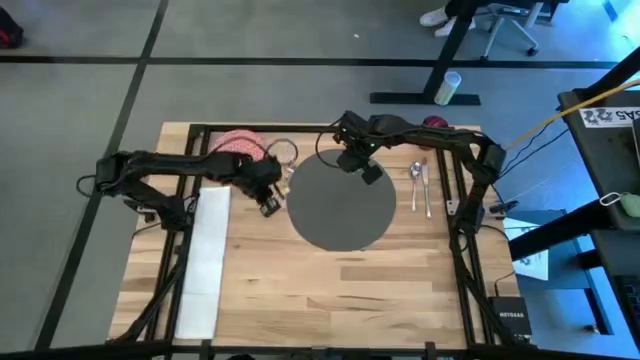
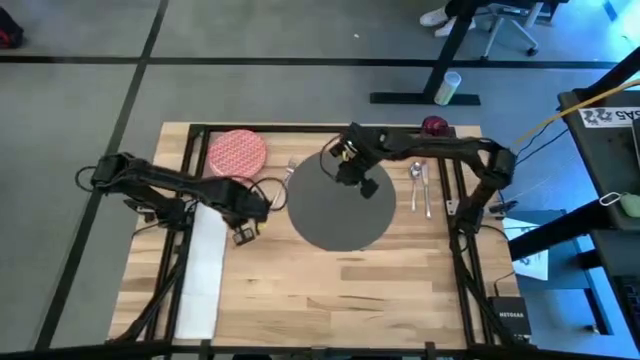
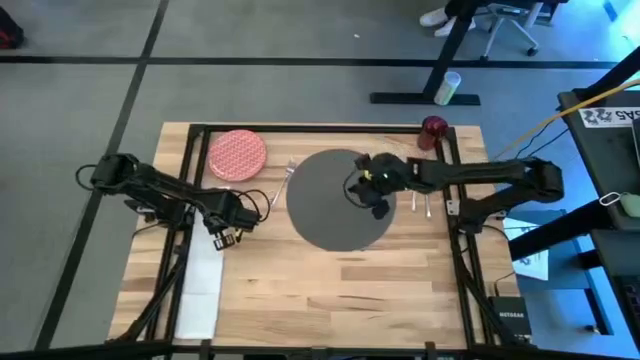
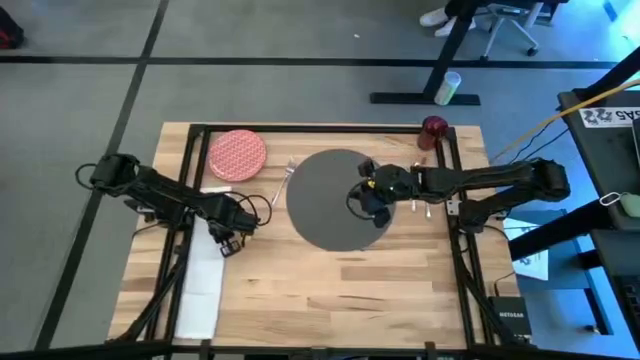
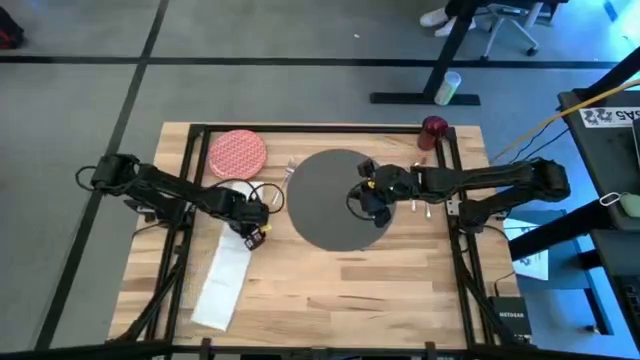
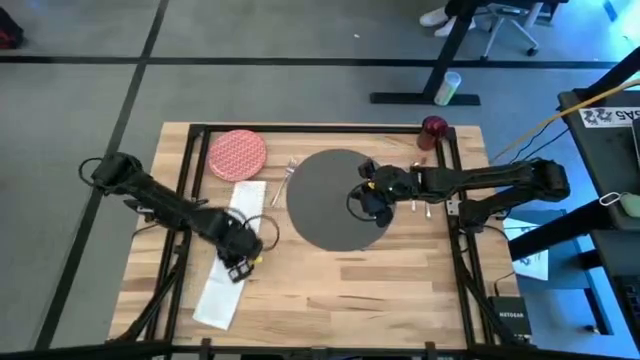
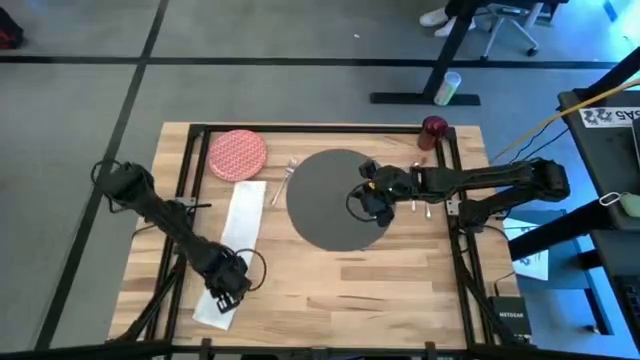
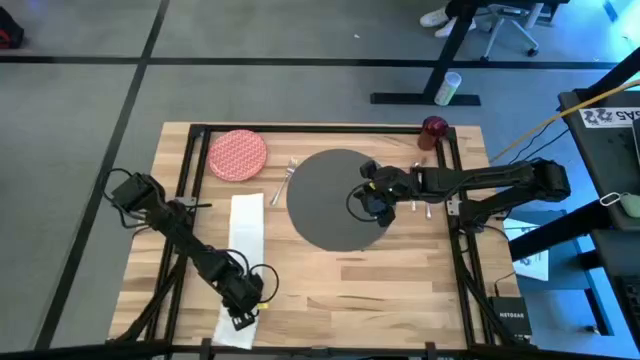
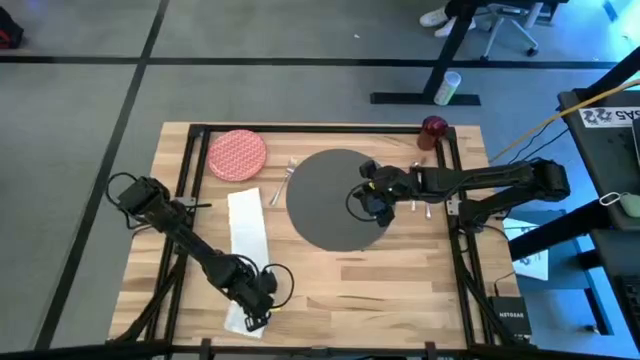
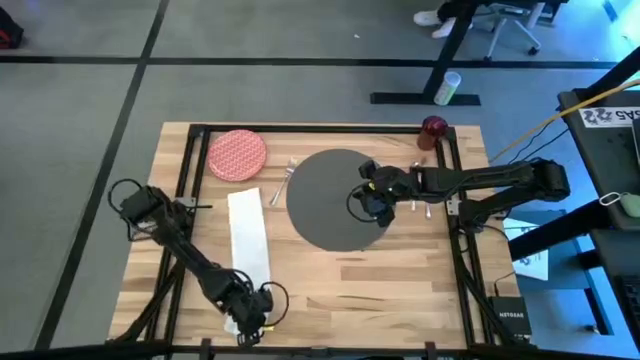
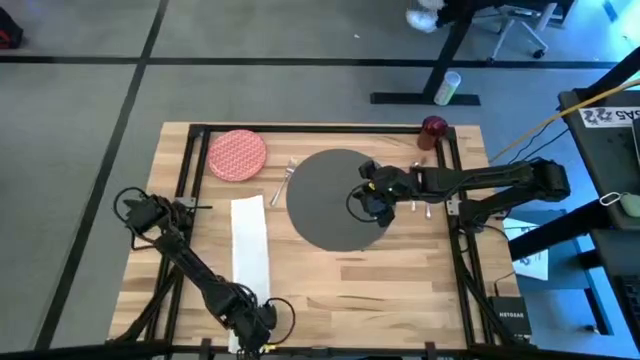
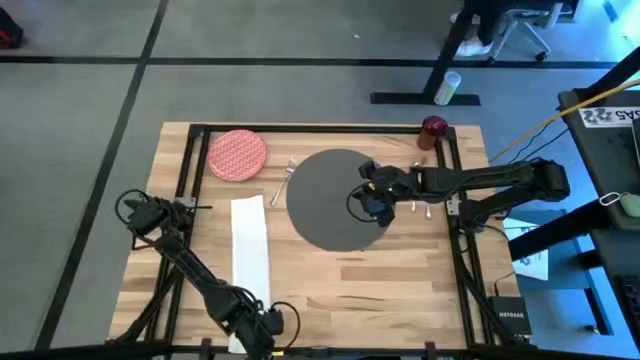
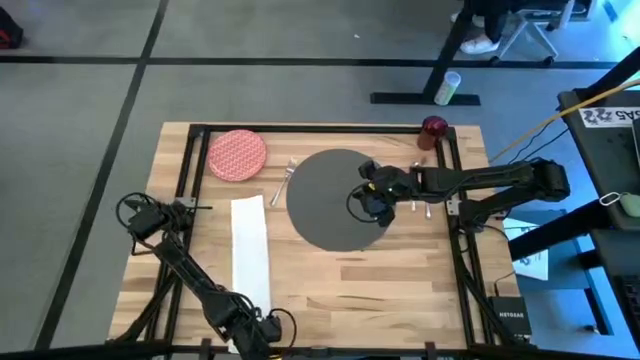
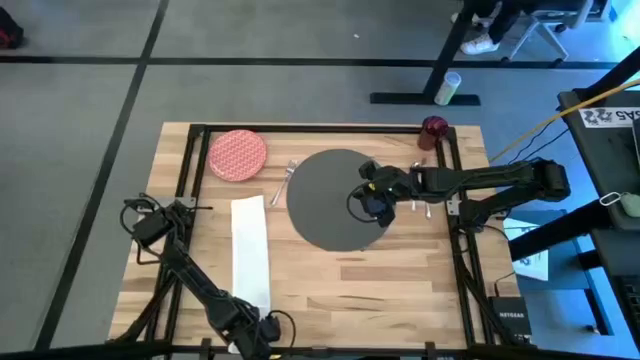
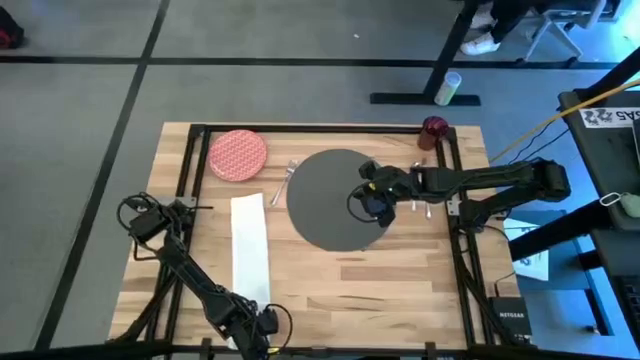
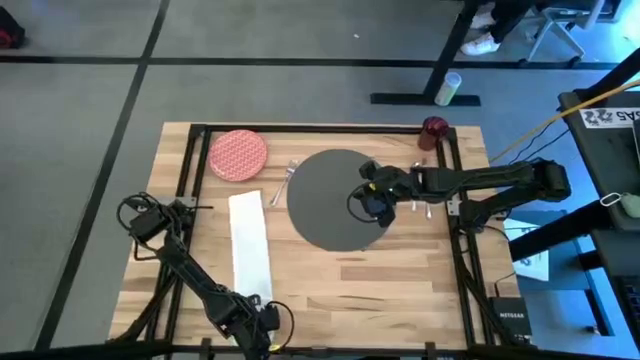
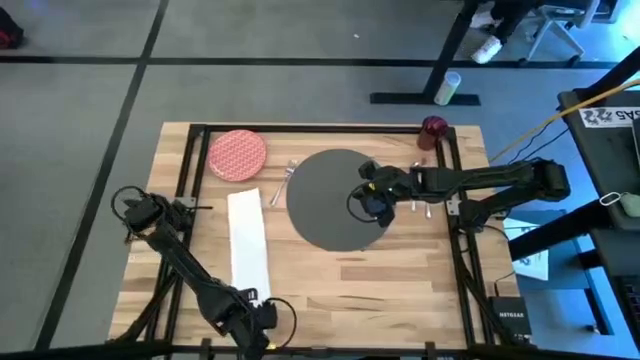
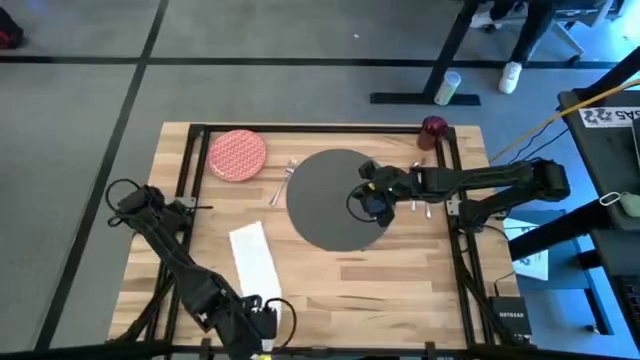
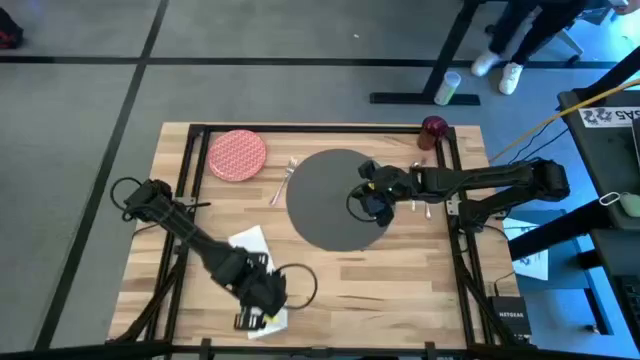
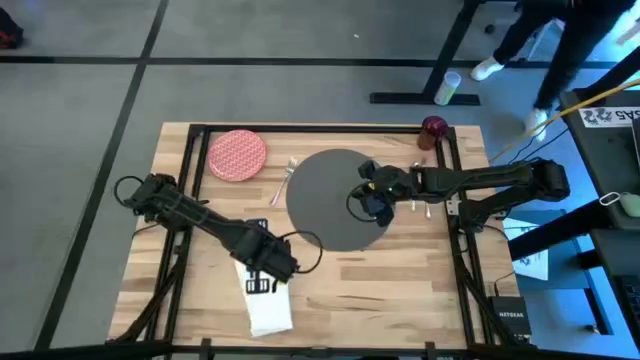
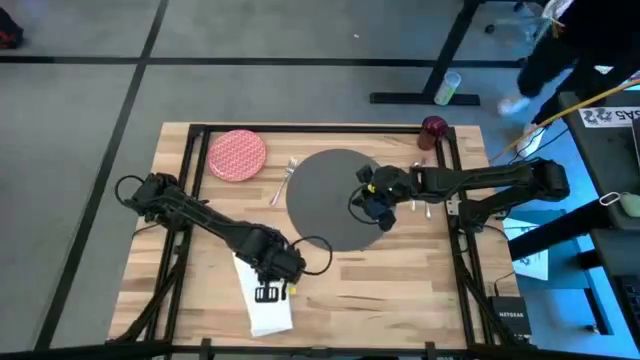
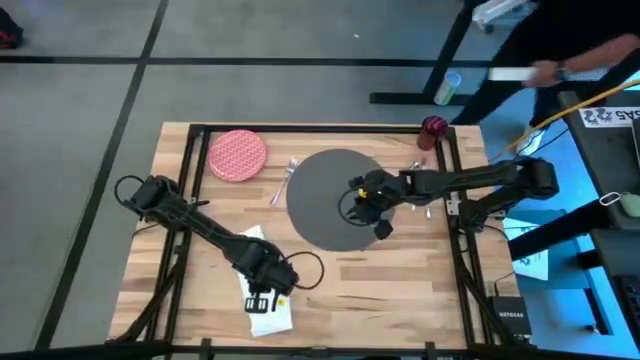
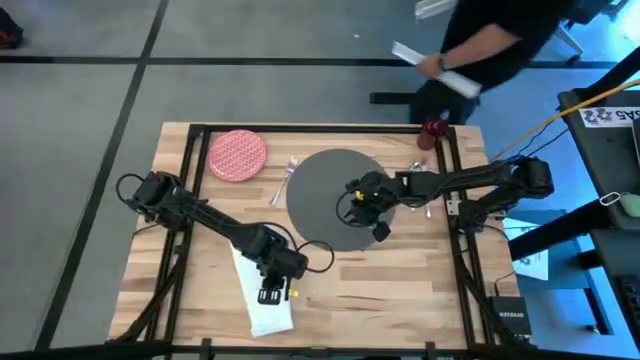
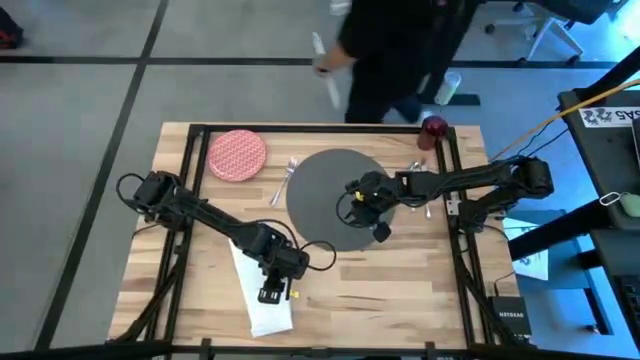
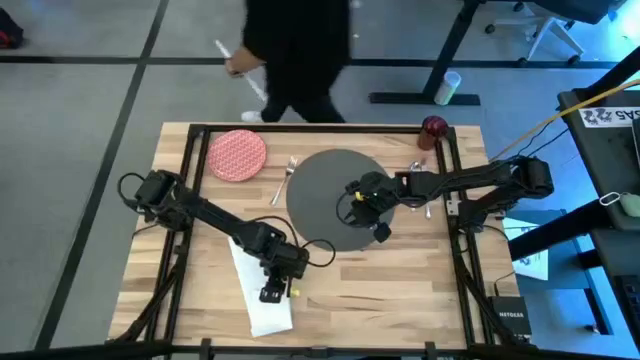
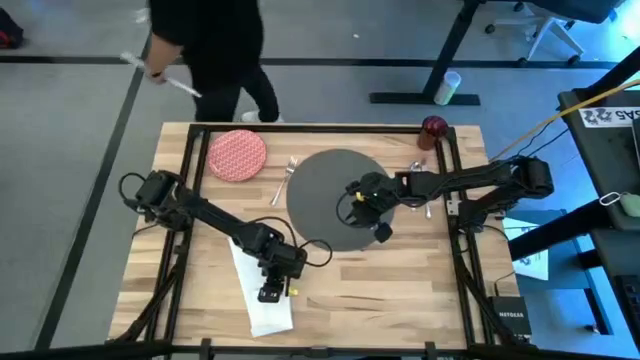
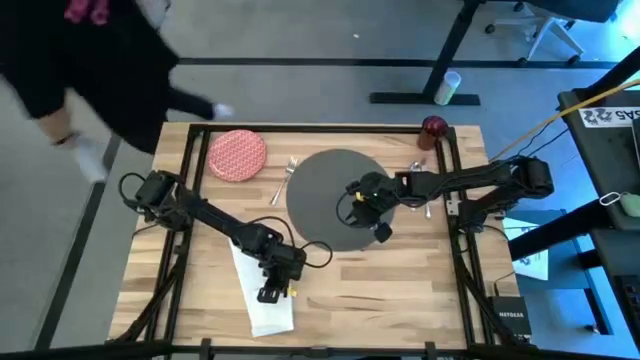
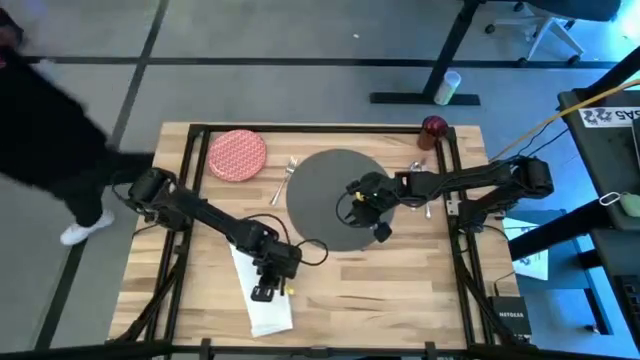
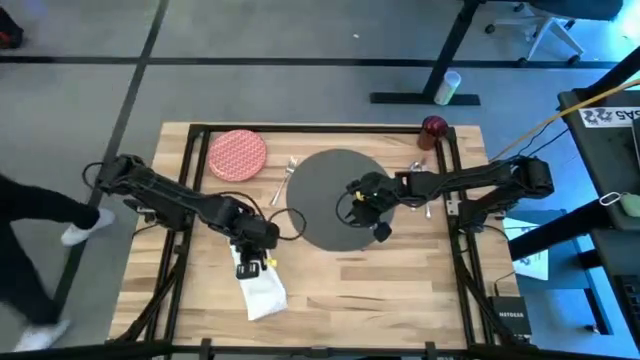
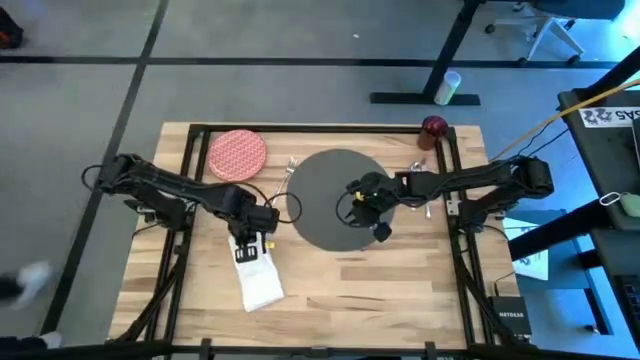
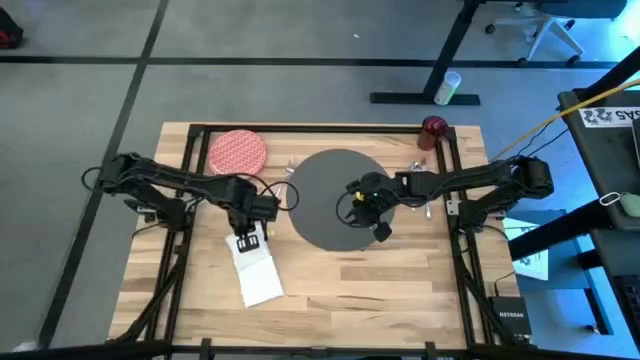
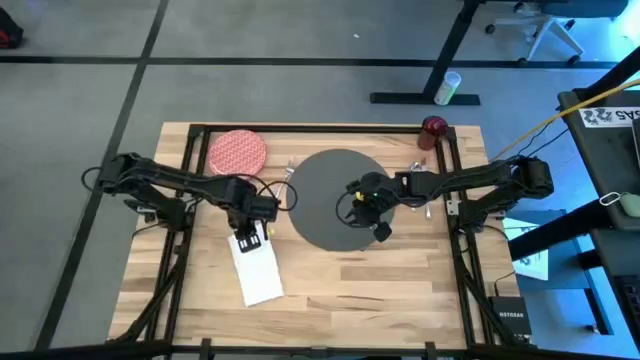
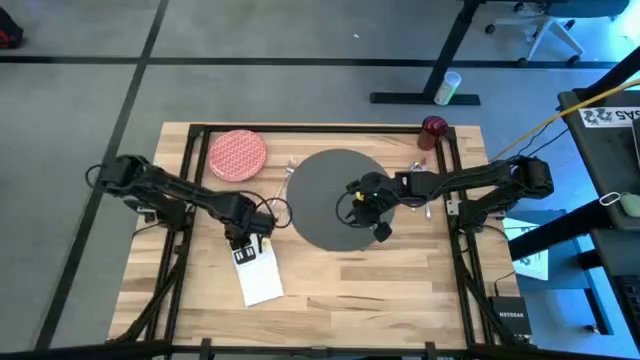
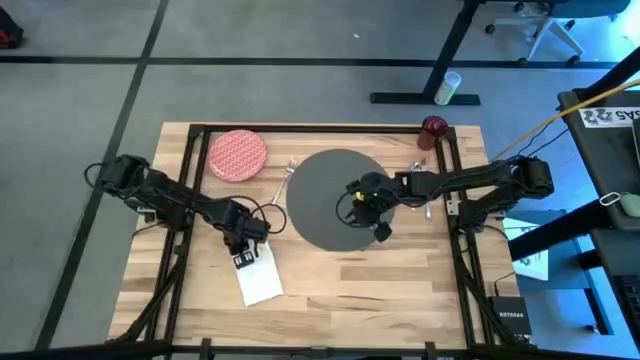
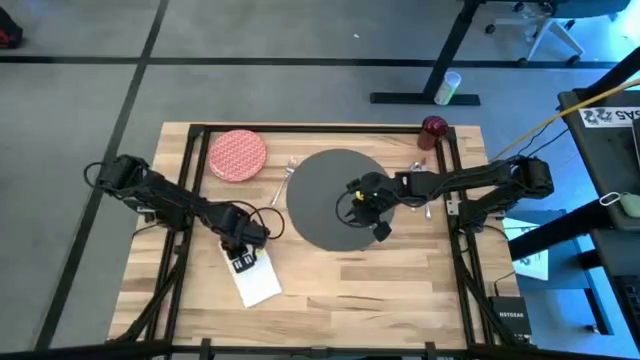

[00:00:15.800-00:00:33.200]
Task: Set table place
Fold the white table napkin
